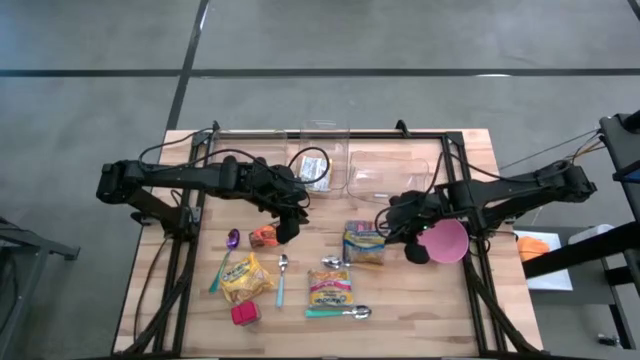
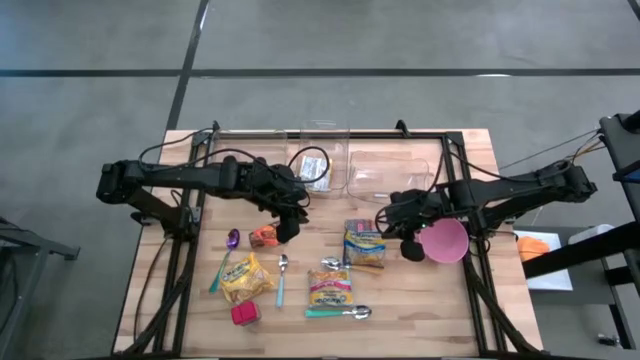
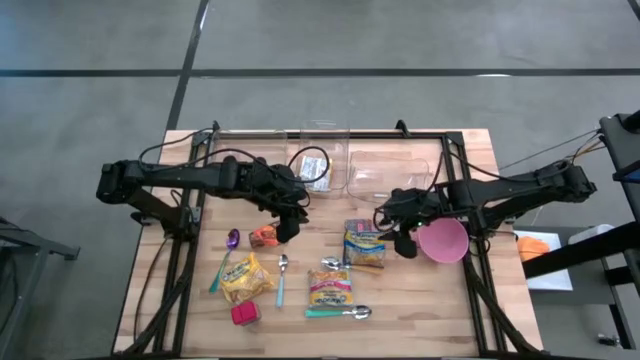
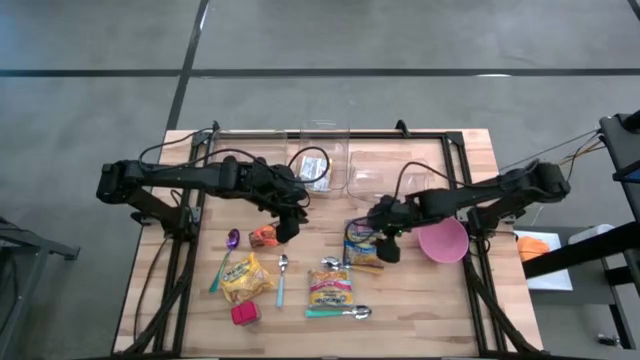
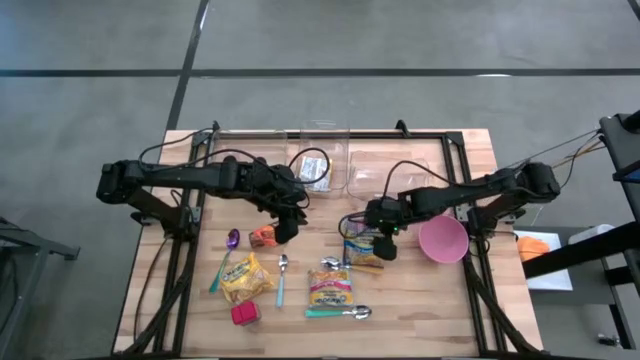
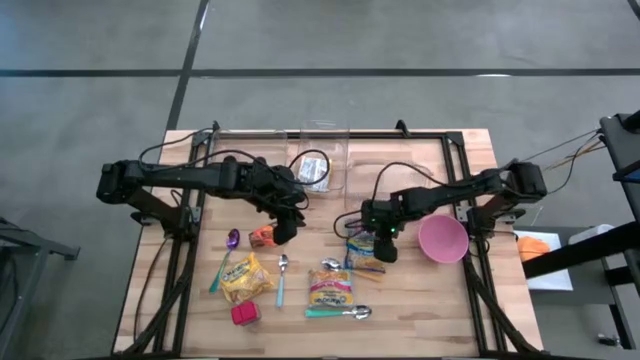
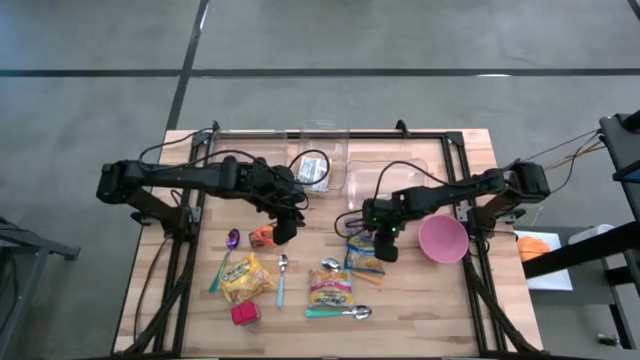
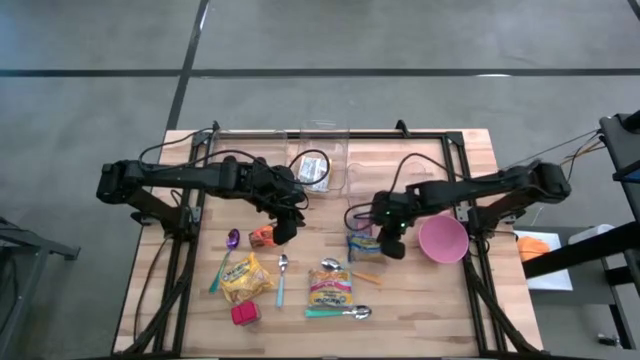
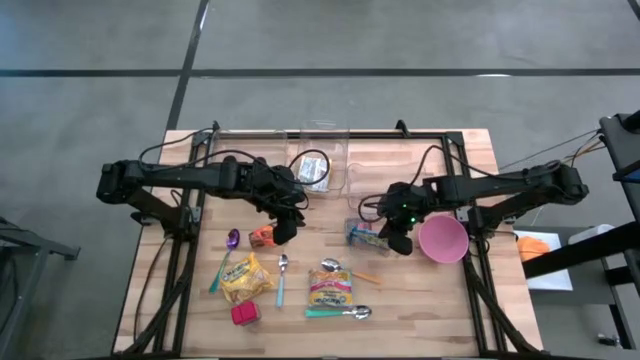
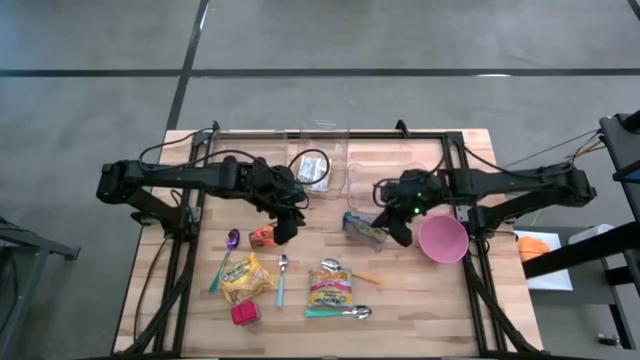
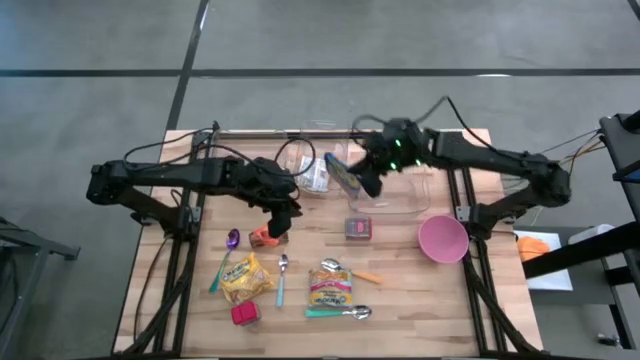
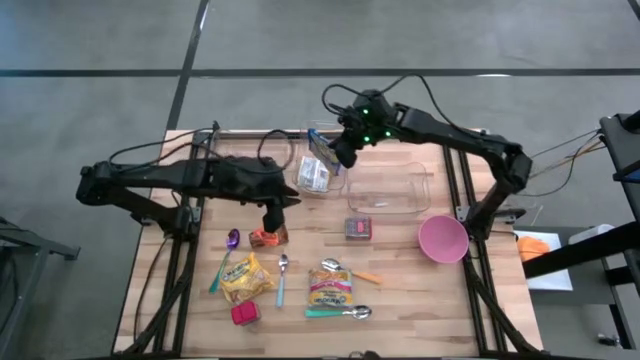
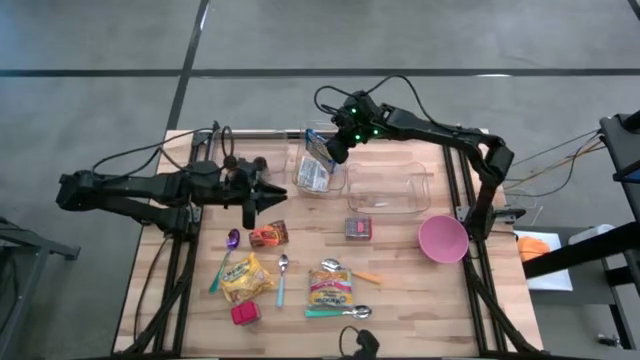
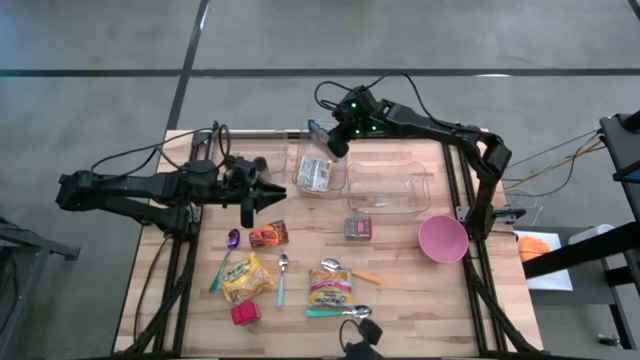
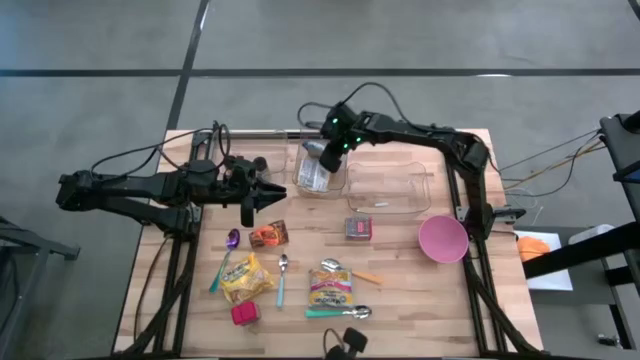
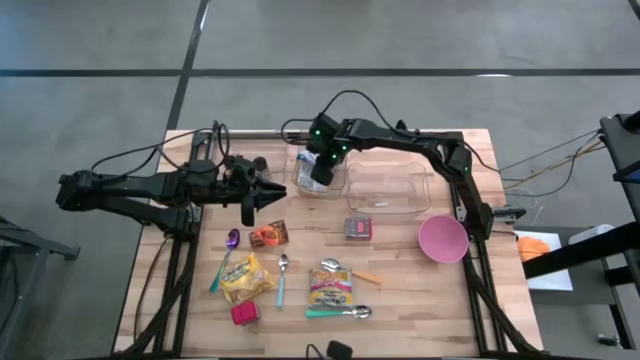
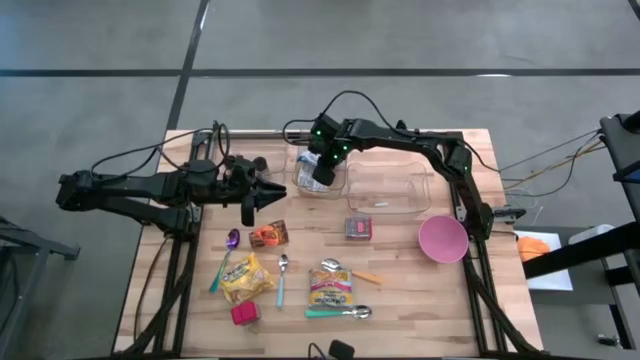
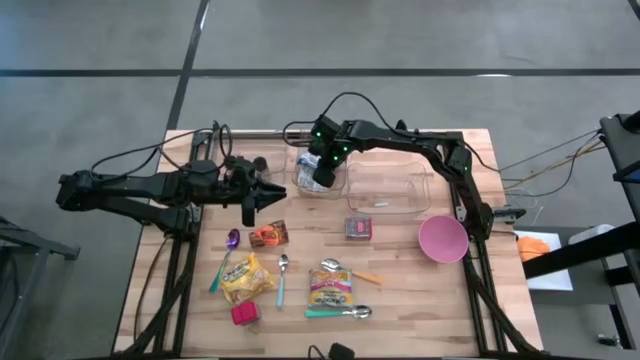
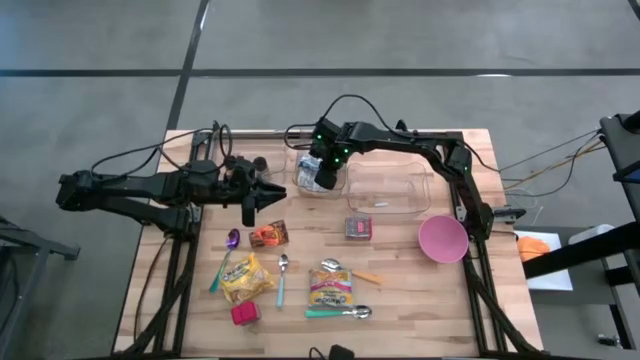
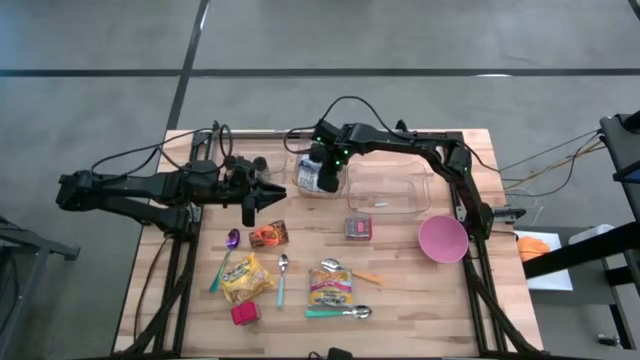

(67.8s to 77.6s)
Put the blue noodle pack into the middle transparent bin

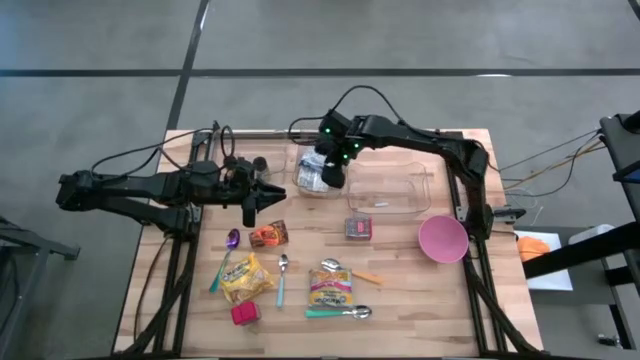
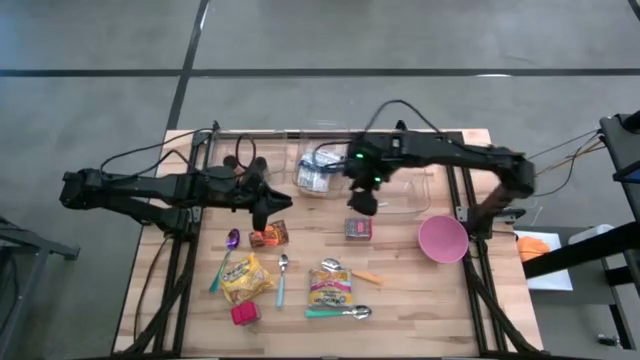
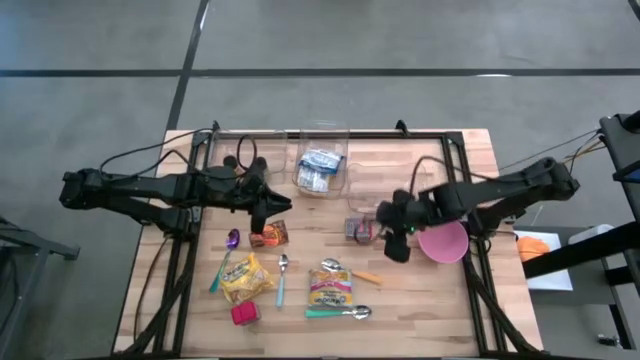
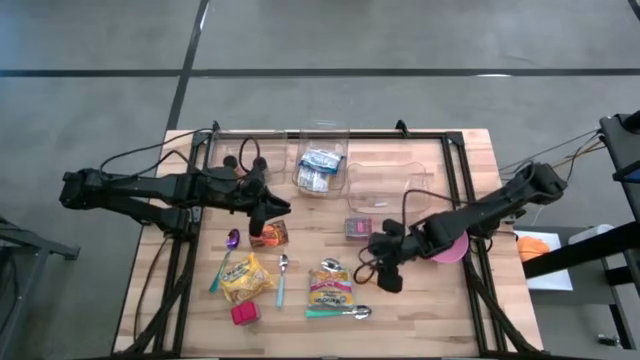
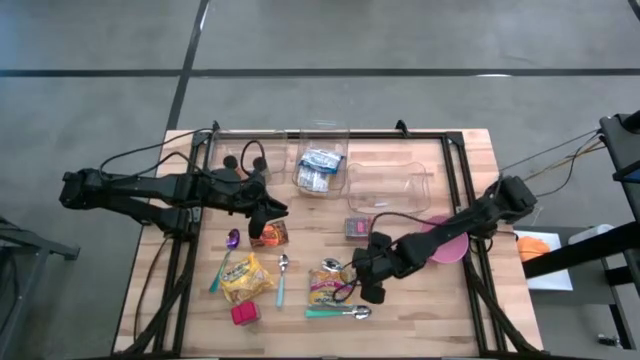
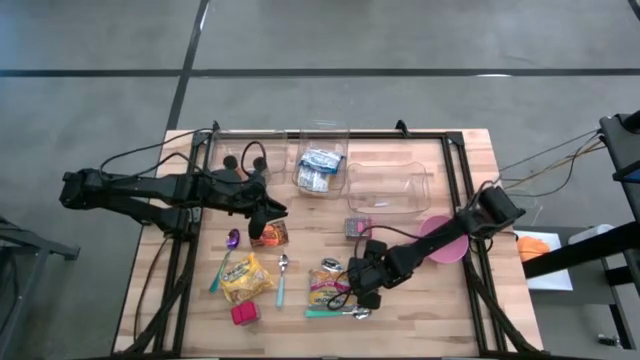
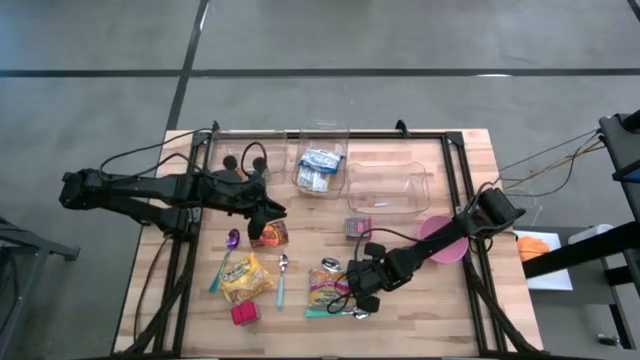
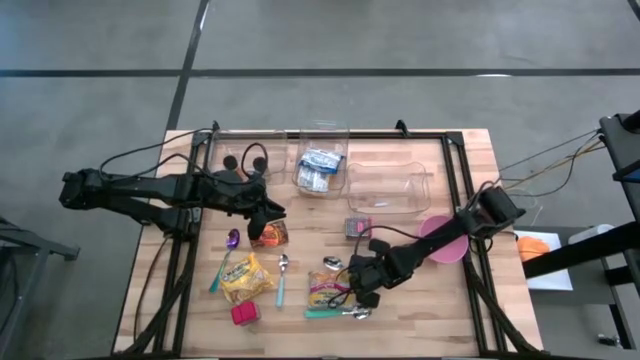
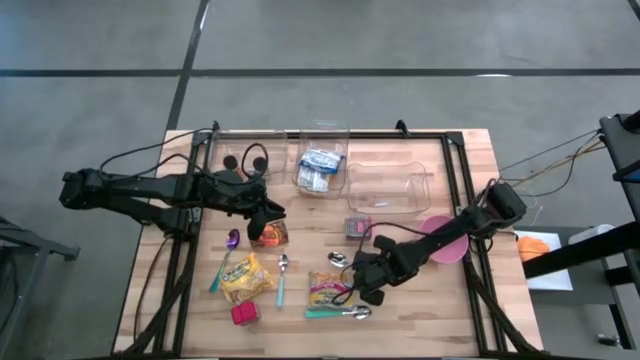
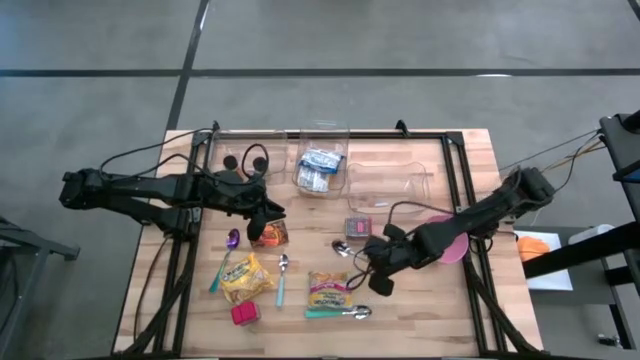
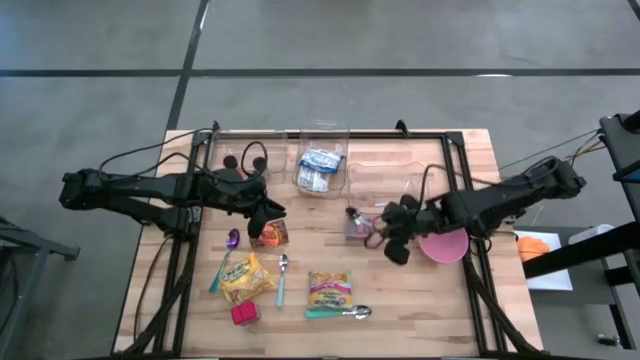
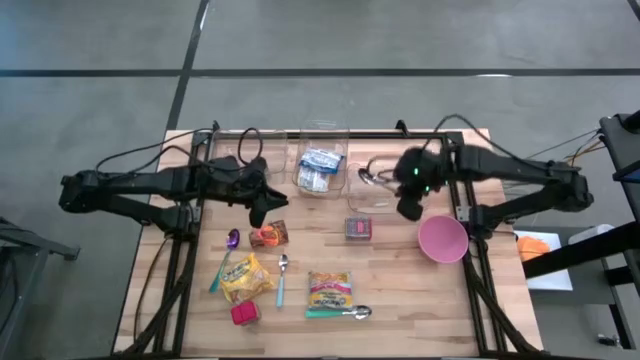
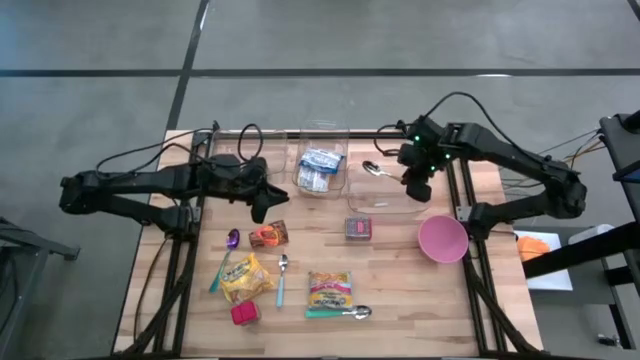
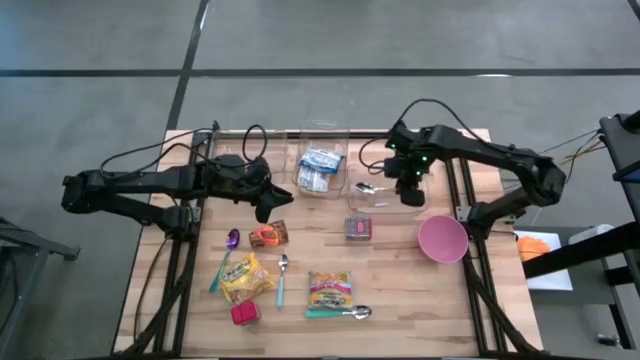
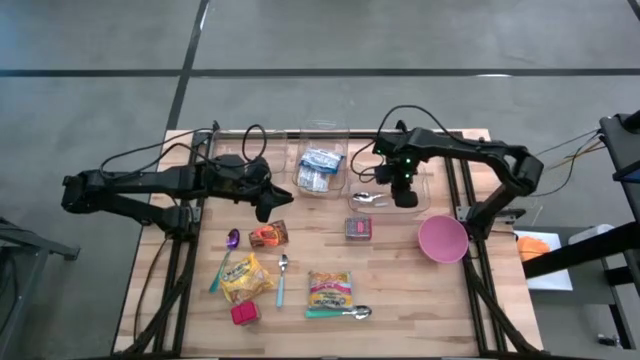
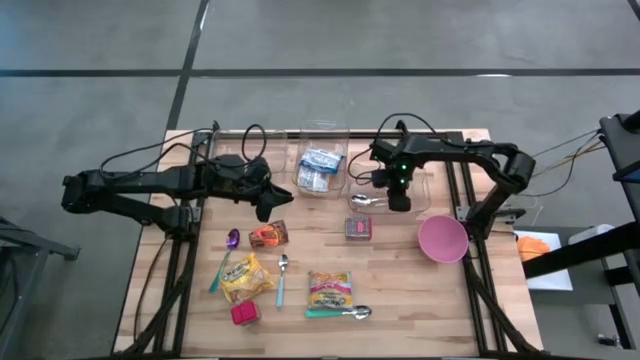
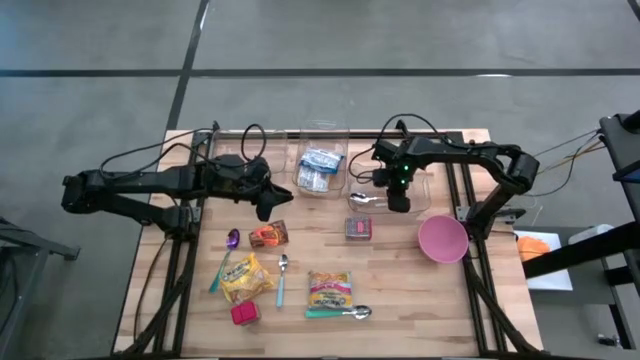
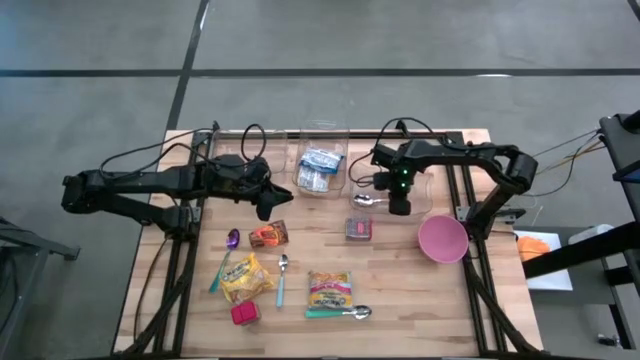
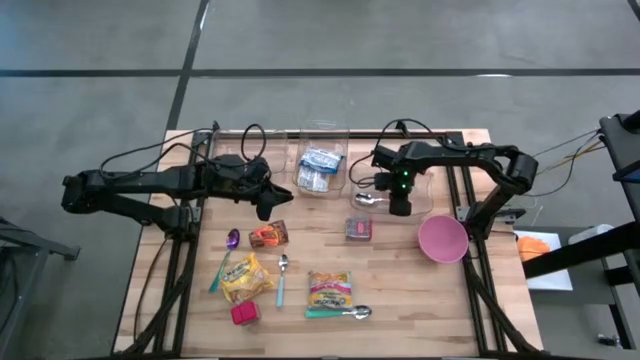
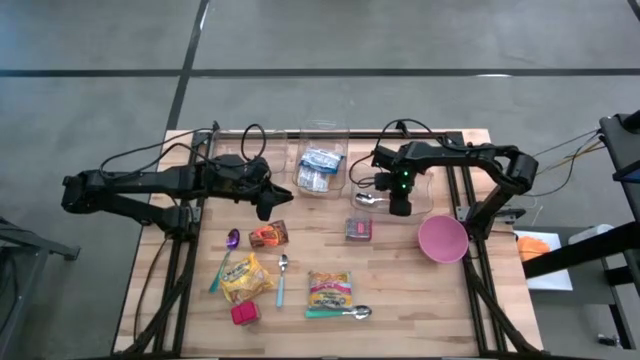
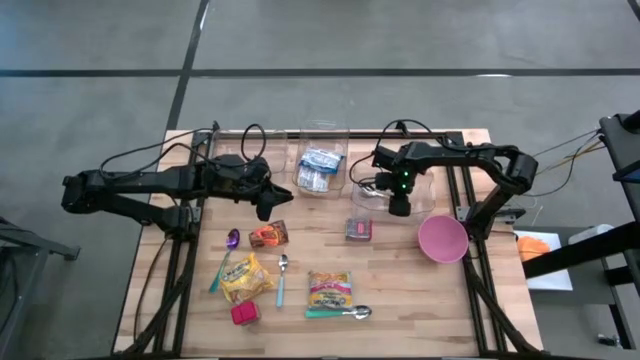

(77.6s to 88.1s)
Put the yellow spoon into the right transparent bin
